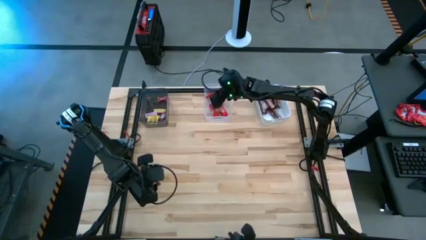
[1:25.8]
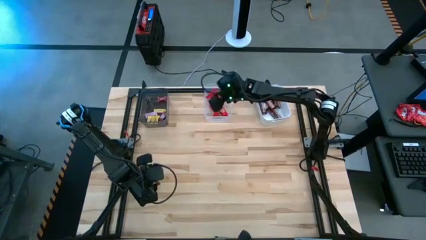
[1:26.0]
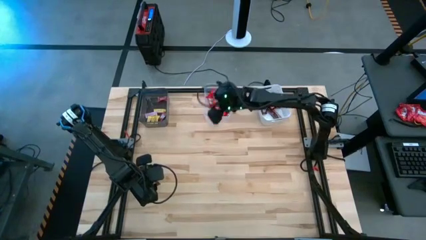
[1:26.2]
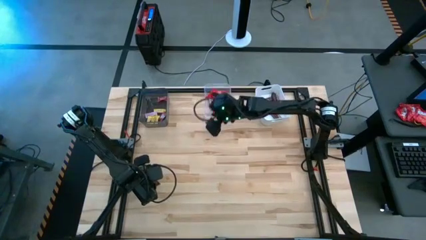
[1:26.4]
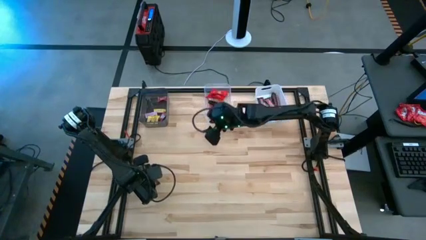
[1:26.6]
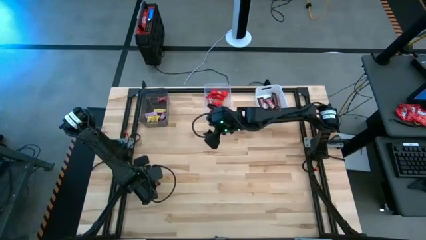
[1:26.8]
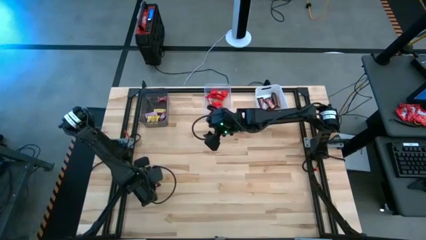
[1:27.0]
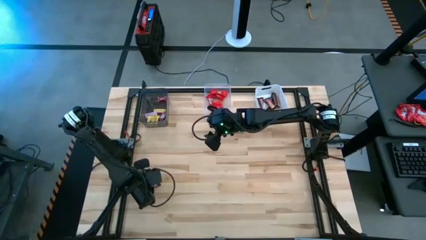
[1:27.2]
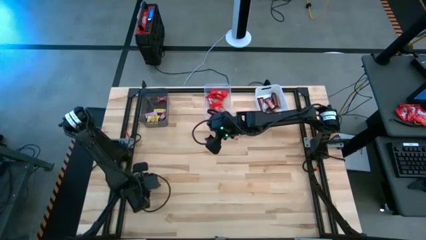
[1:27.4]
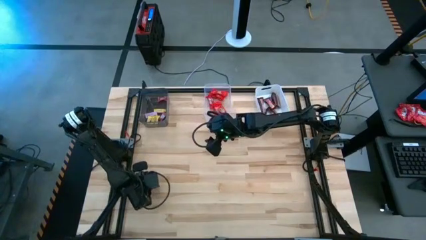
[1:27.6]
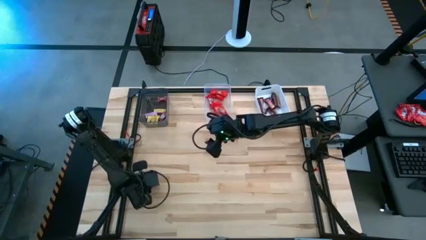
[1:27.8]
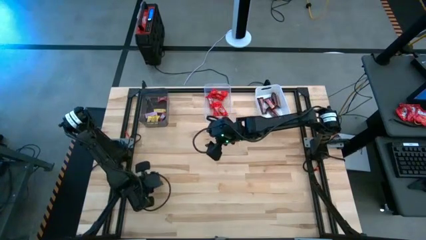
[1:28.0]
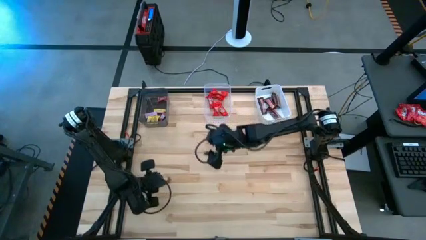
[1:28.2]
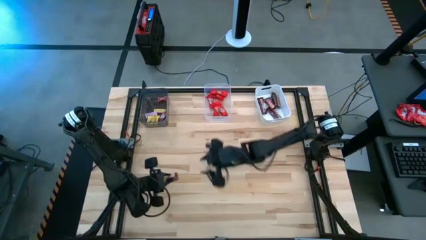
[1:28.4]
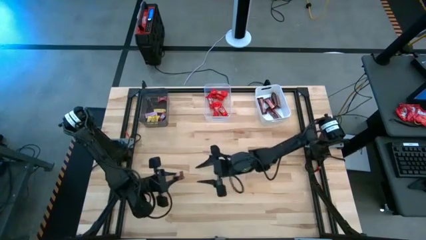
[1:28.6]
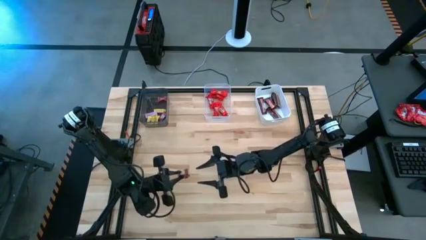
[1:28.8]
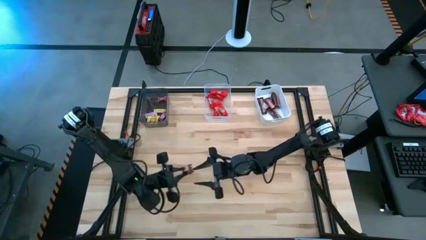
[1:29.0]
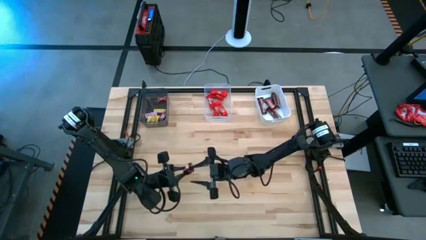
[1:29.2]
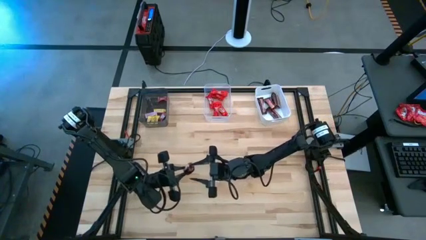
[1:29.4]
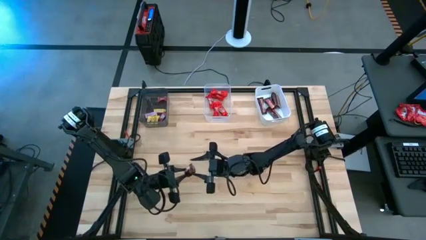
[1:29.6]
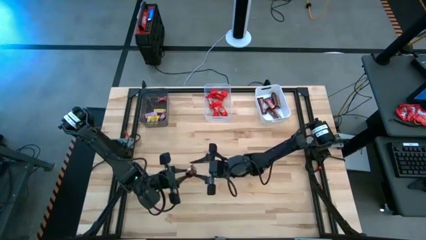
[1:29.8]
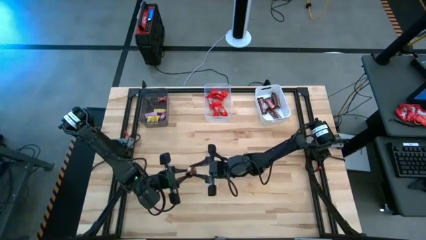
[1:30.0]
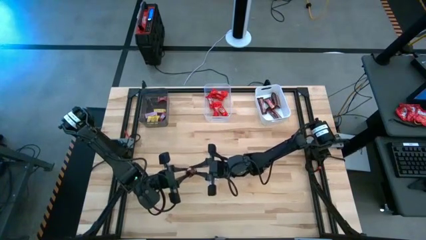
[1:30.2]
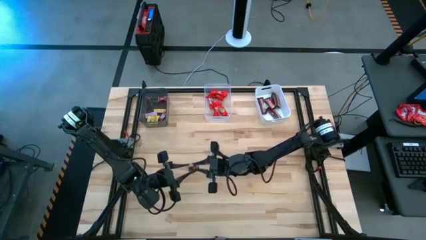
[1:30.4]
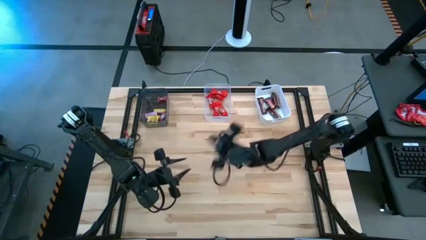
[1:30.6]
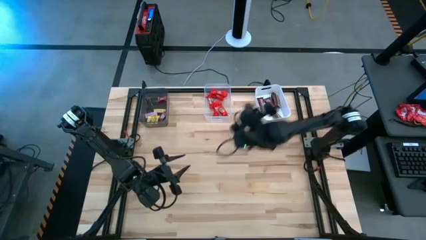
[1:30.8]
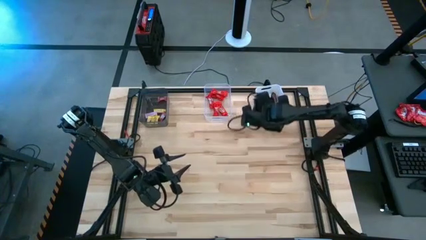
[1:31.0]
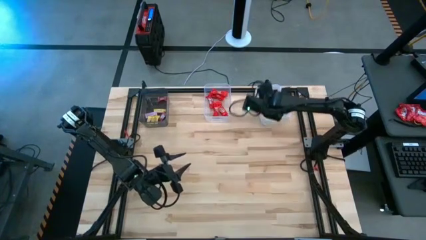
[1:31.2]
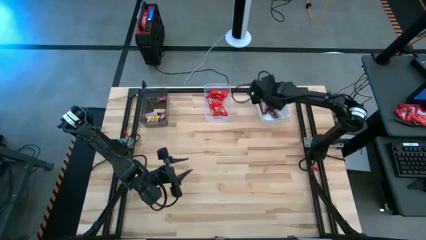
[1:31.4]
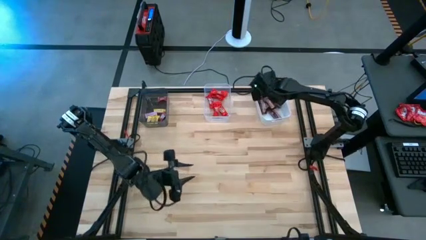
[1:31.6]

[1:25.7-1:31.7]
Task: Sort candy by brand, put in halloween buckets
Put the brown chocolate bar into the white bin

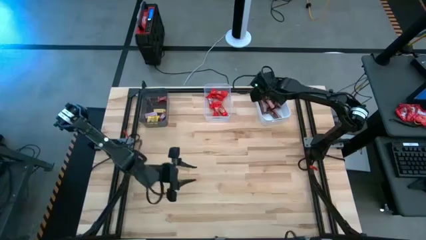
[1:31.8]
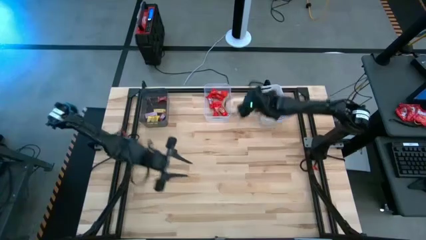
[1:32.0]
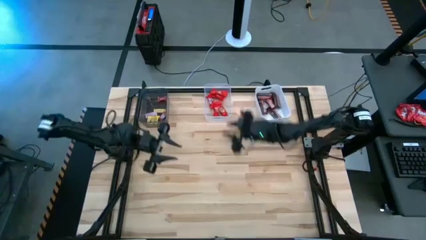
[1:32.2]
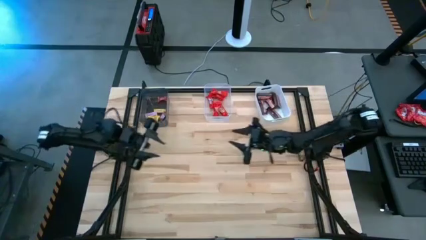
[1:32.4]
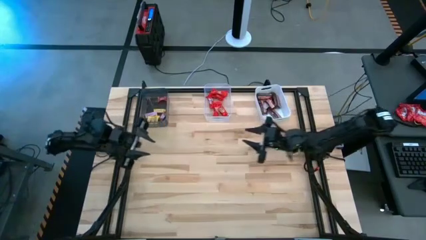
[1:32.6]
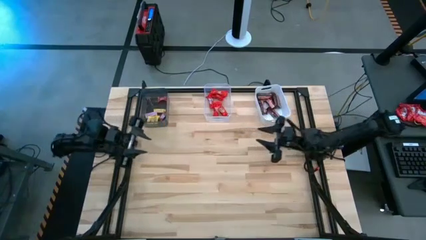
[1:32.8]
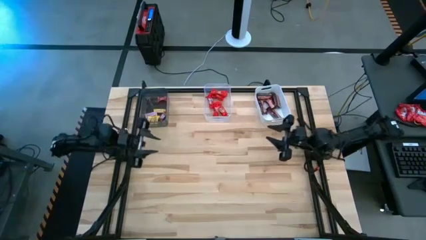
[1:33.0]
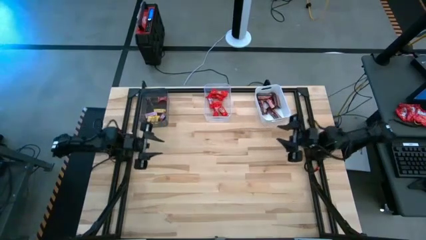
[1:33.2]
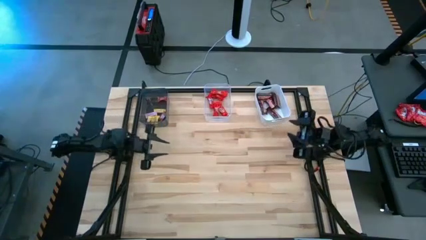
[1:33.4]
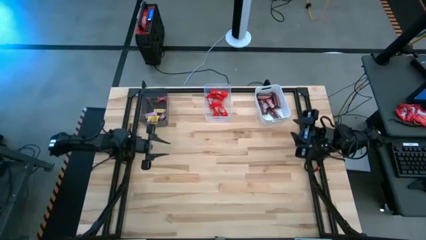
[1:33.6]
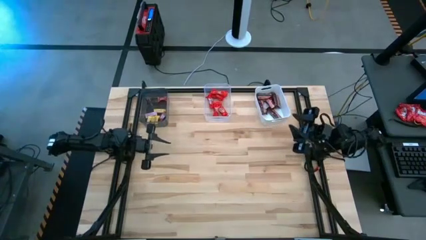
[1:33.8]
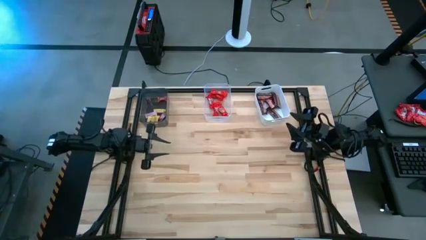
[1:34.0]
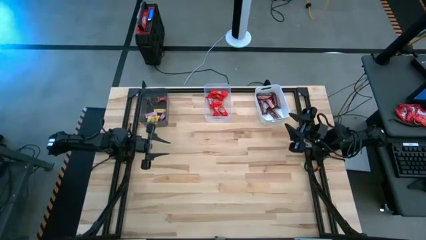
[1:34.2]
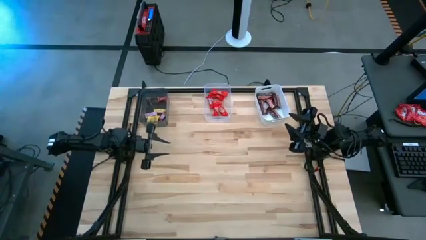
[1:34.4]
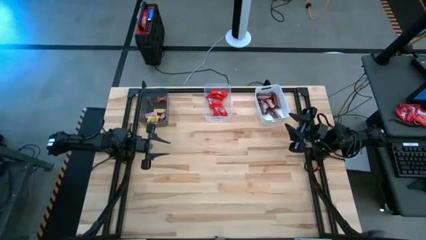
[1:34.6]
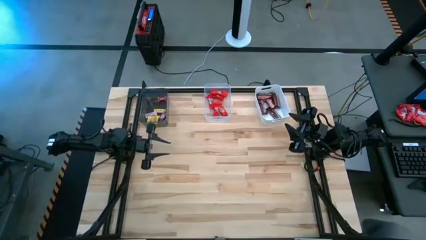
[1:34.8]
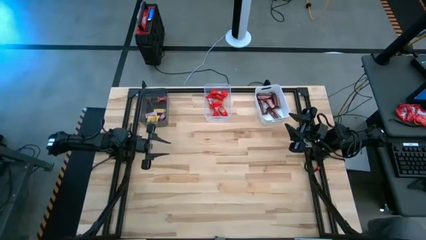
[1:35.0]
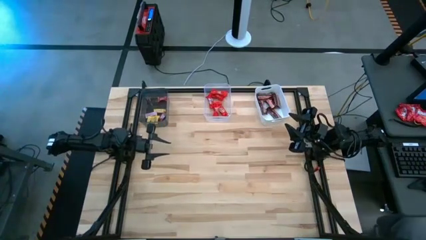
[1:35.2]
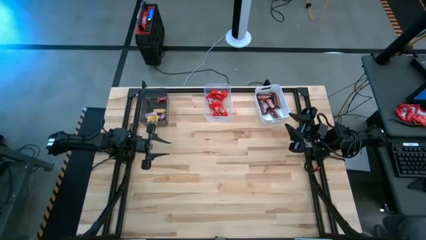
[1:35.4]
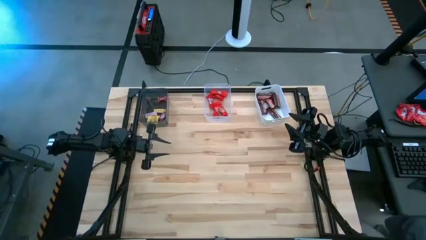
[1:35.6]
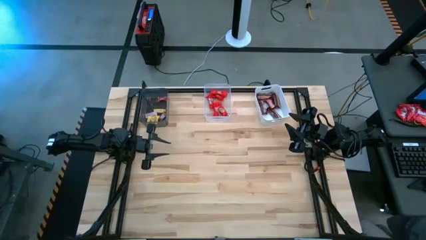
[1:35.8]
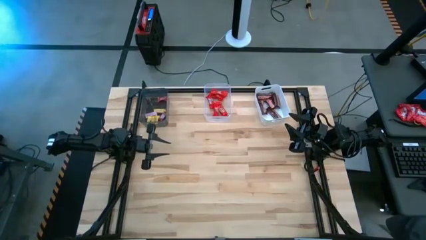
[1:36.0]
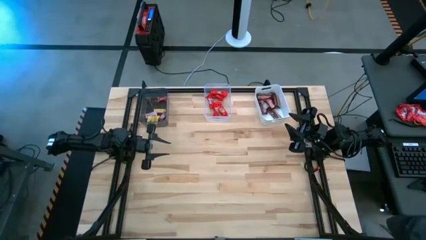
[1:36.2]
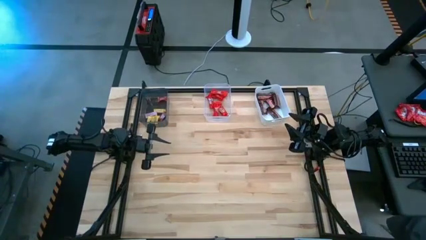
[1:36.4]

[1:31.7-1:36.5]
Return to Home Position

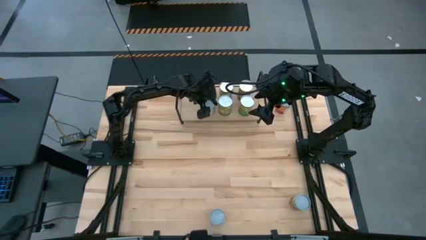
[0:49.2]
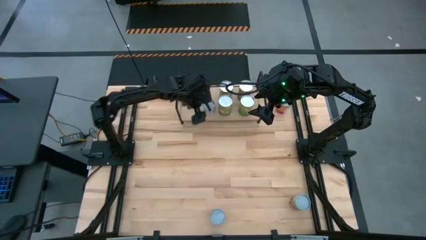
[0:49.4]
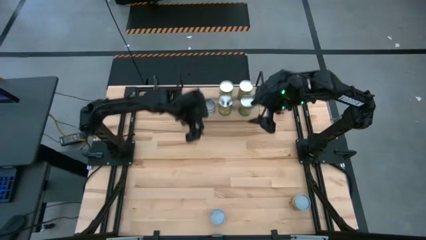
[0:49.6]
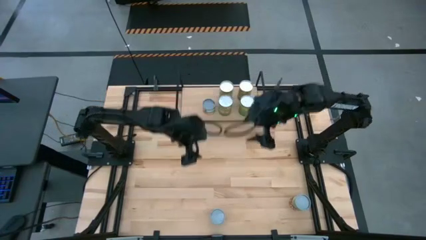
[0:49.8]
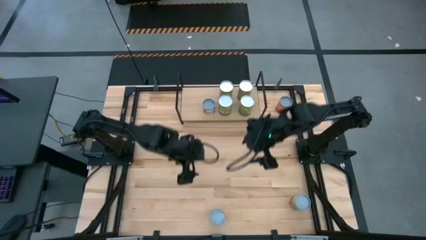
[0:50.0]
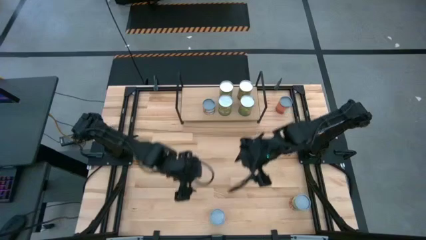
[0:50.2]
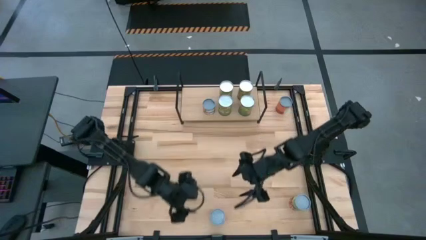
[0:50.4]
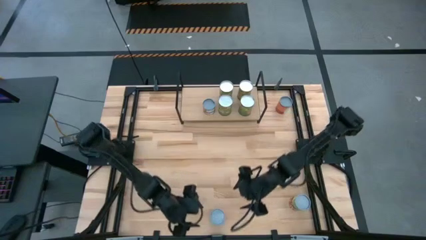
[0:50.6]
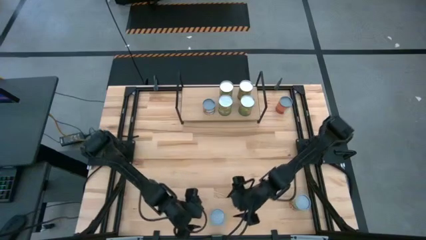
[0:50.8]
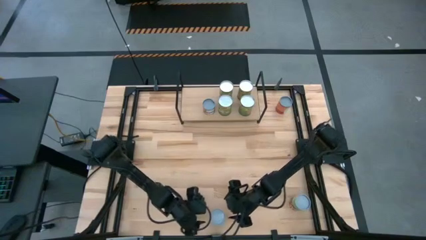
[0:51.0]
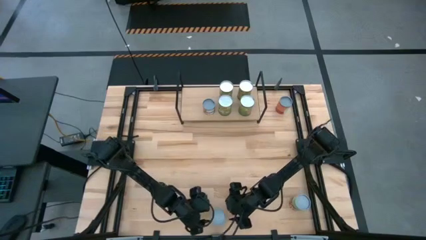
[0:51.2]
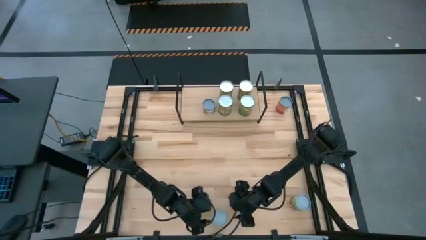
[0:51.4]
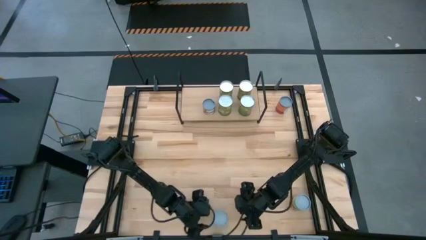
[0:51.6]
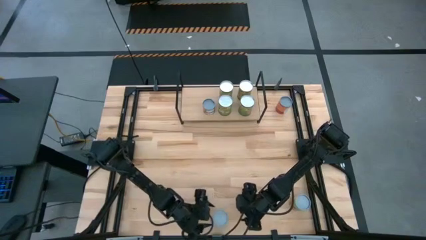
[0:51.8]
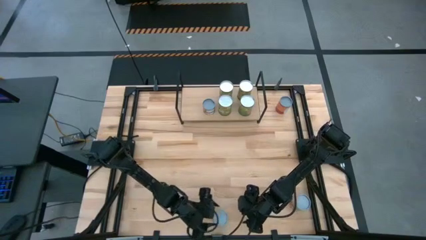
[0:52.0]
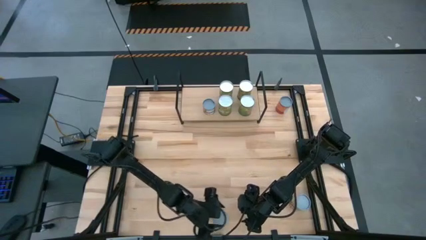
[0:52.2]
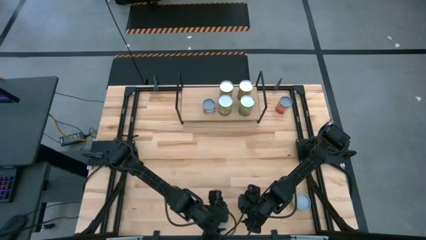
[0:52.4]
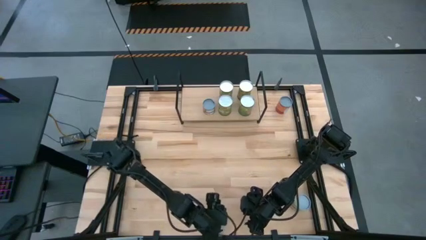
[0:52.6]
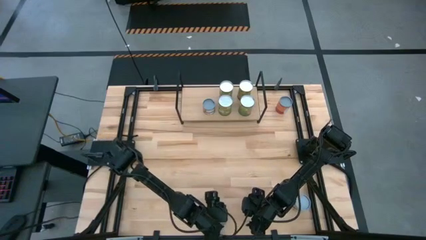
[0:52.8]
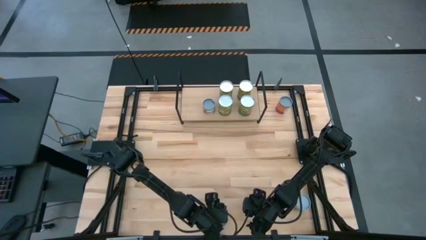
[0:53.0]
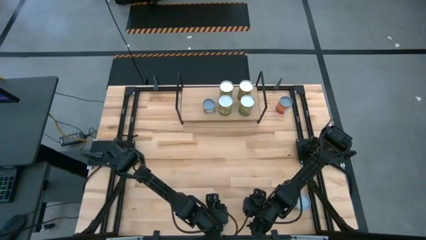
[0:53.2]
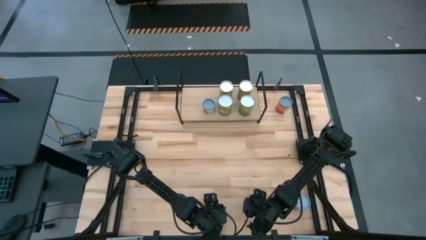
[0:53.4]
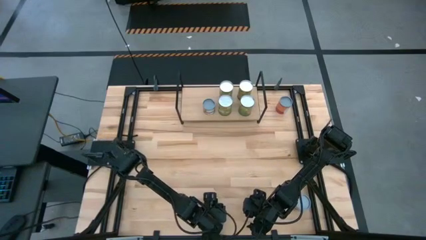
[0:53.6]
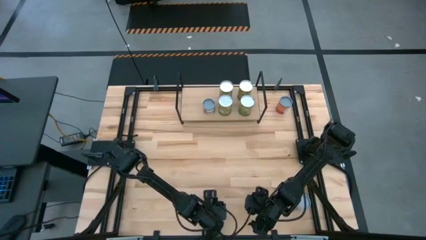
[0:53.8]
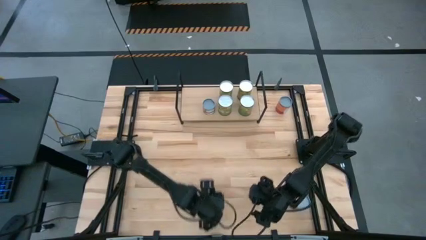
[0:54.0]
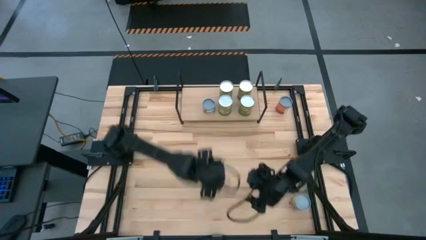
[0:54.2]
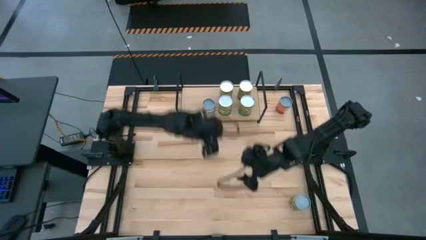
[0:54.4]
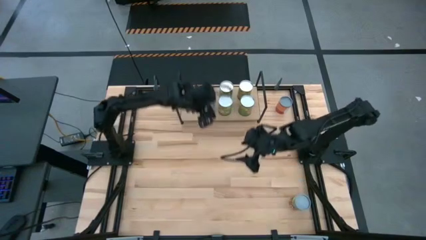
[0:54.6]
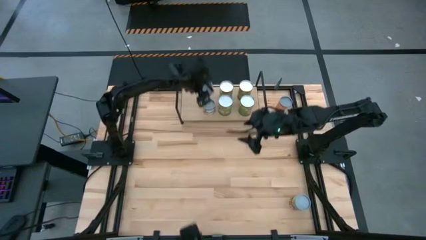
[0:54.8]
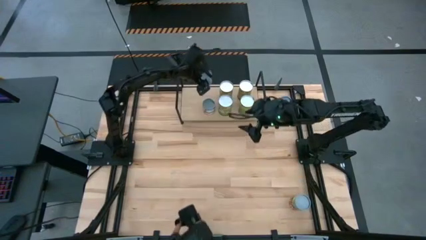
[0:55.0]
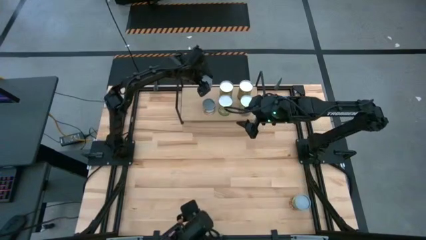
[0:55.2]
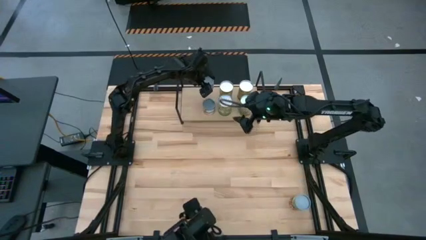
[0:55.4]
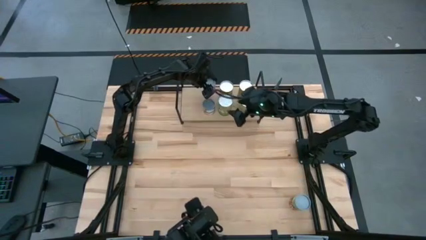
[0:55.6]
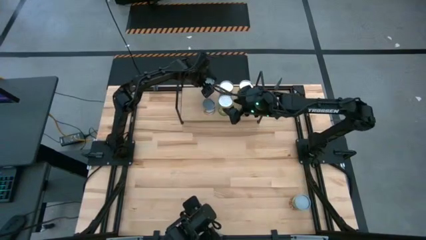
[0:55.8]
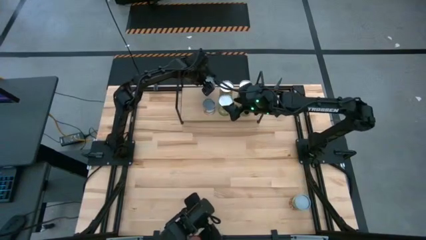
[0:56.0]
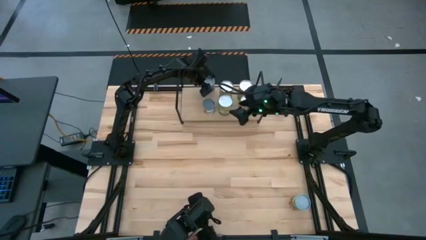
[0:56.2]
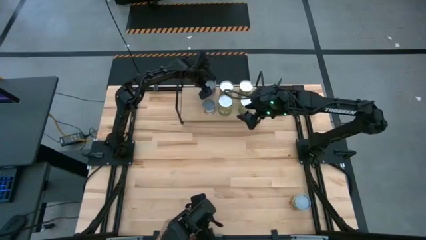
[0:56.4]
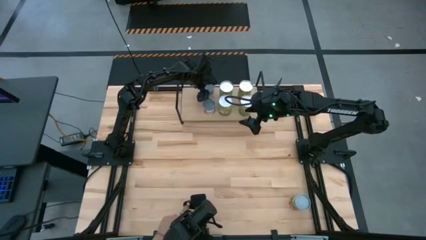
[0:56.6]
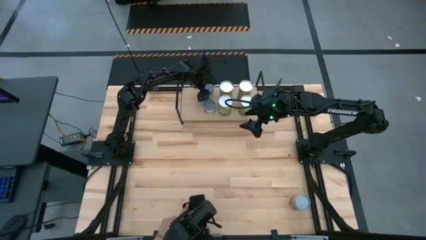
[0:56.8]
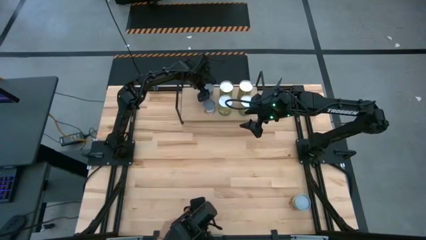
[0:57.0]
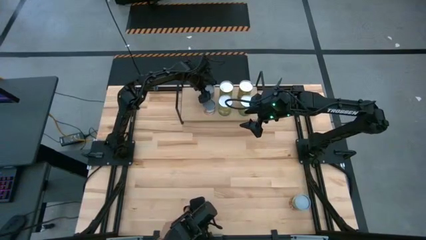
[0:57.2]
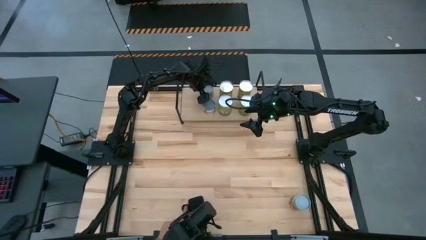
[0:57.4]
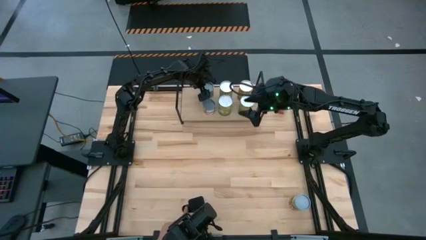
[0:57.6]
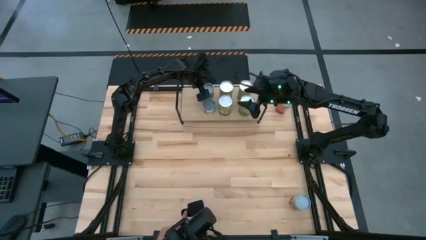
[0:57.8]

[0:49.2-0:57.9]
Task: Pick and place cans onto a shelf
Put the canned corn on the shelf
